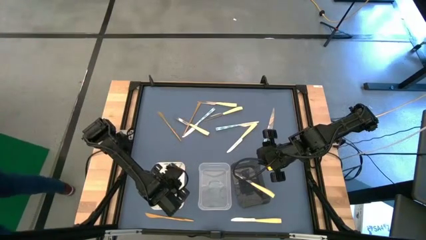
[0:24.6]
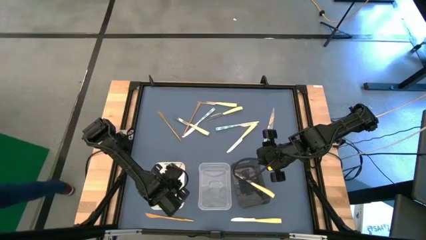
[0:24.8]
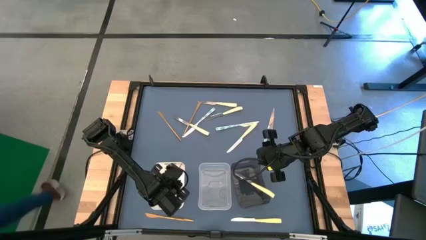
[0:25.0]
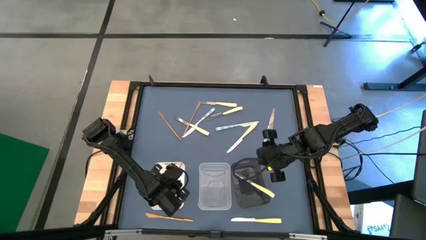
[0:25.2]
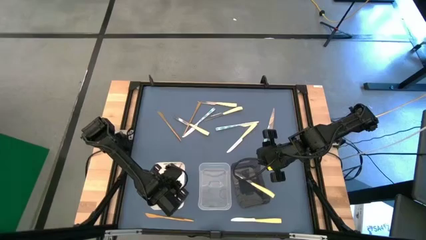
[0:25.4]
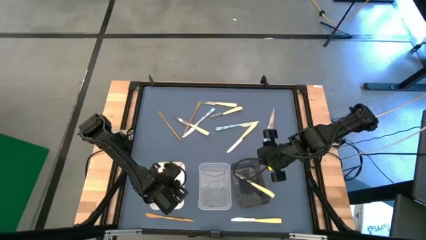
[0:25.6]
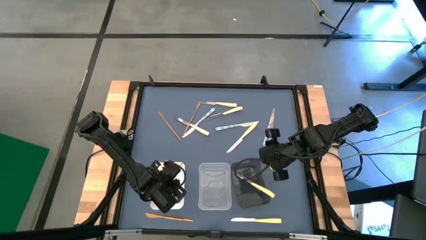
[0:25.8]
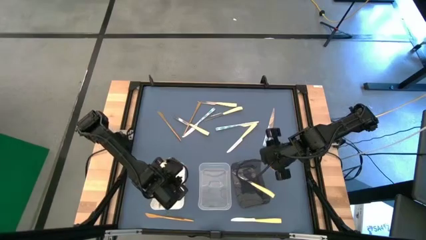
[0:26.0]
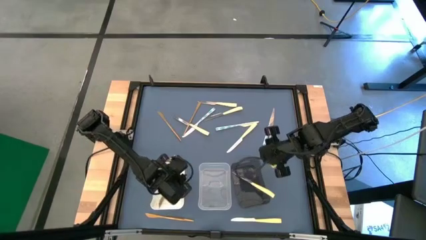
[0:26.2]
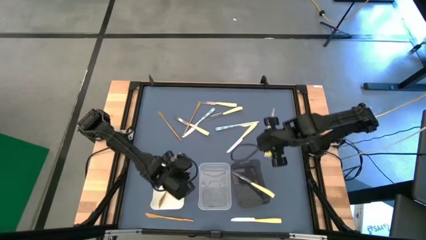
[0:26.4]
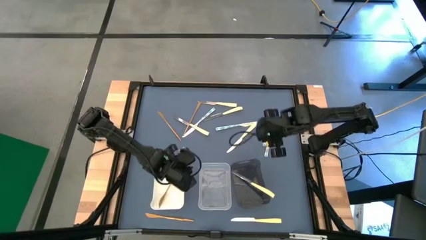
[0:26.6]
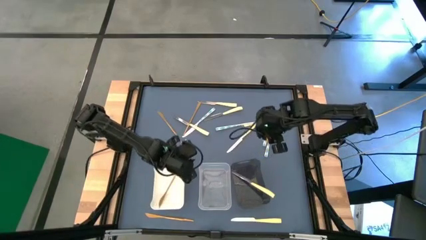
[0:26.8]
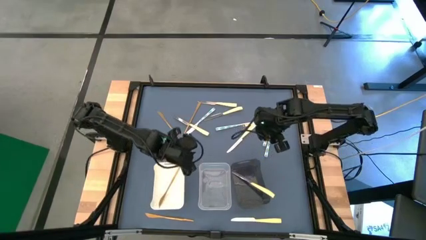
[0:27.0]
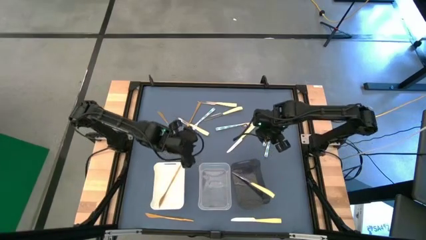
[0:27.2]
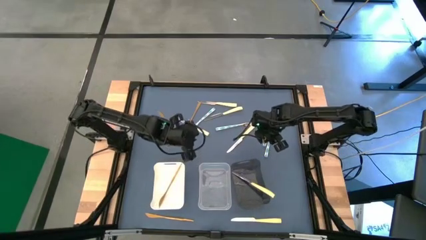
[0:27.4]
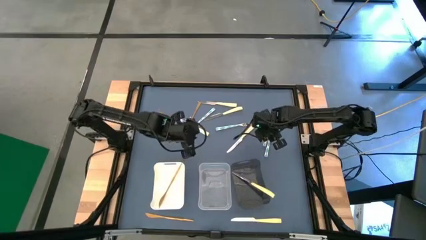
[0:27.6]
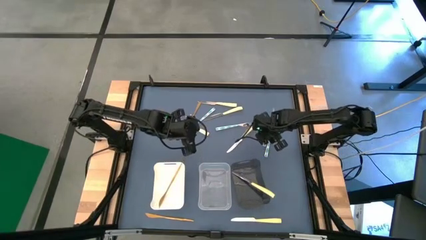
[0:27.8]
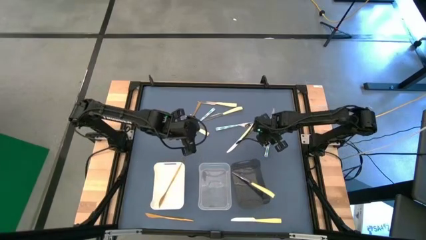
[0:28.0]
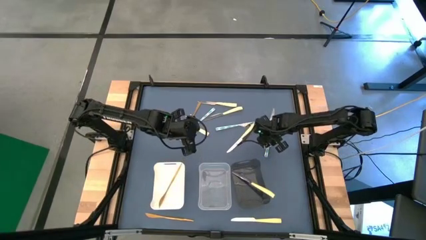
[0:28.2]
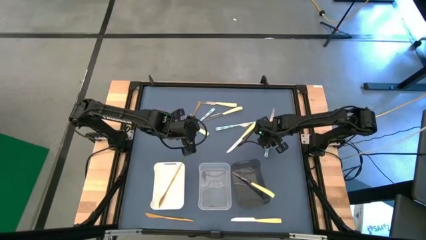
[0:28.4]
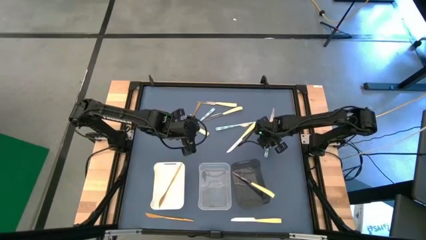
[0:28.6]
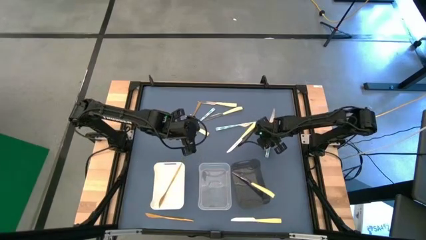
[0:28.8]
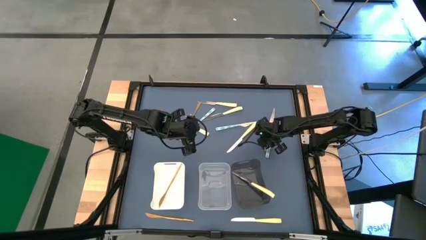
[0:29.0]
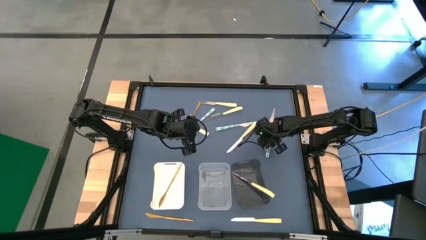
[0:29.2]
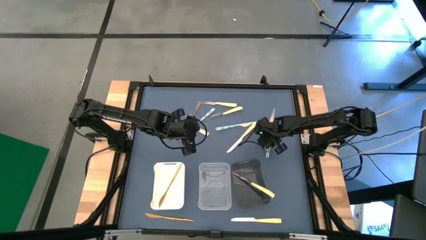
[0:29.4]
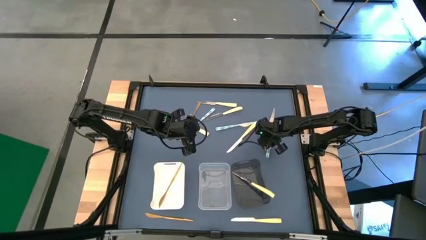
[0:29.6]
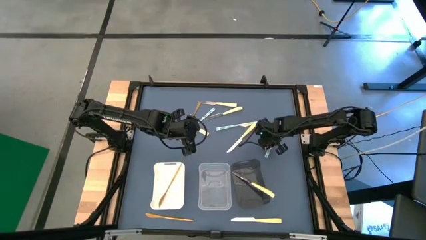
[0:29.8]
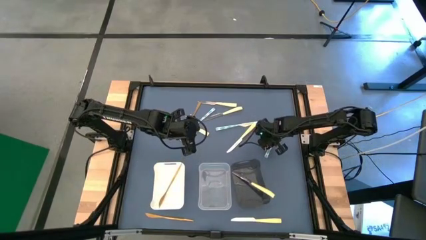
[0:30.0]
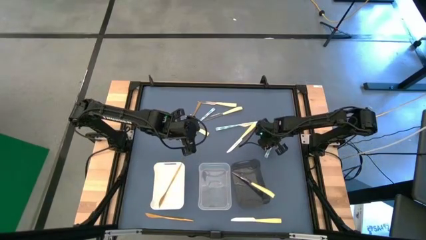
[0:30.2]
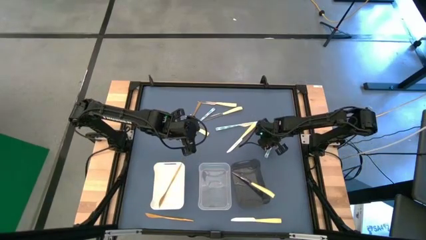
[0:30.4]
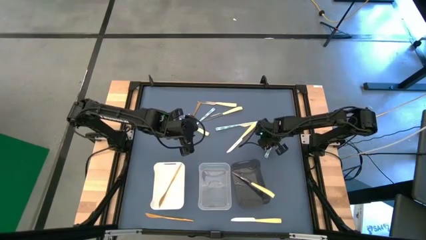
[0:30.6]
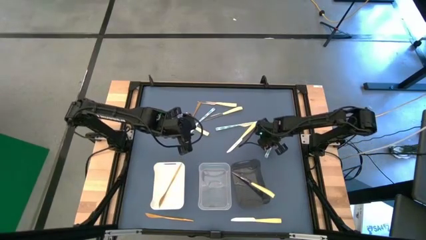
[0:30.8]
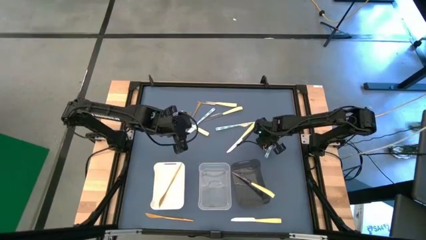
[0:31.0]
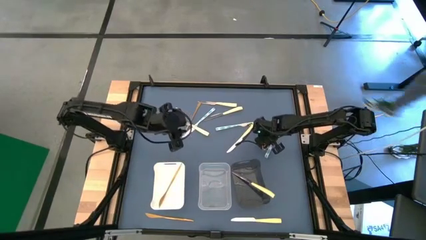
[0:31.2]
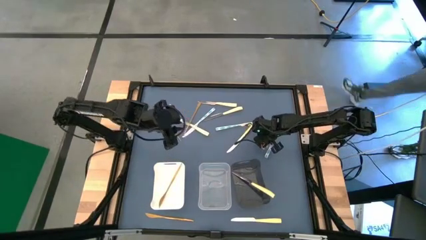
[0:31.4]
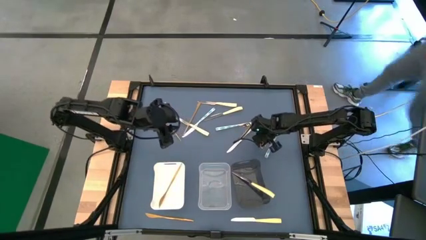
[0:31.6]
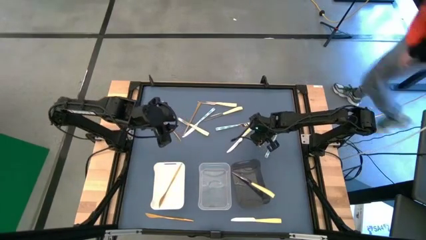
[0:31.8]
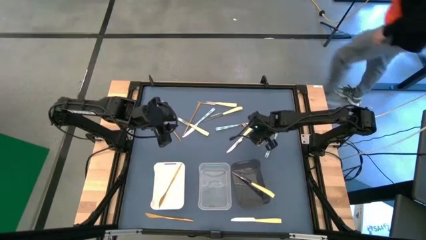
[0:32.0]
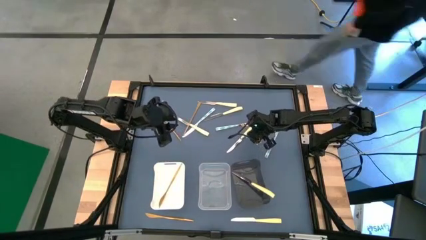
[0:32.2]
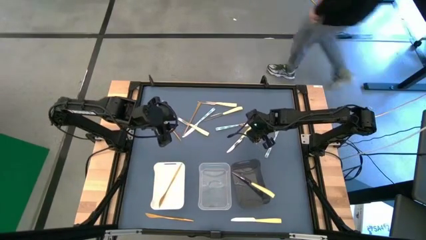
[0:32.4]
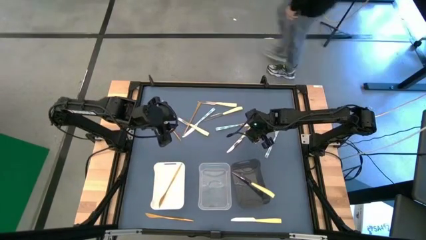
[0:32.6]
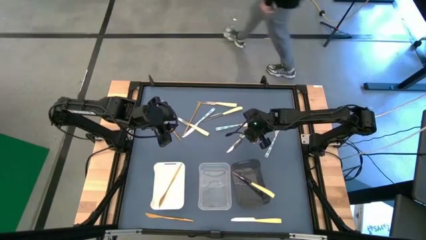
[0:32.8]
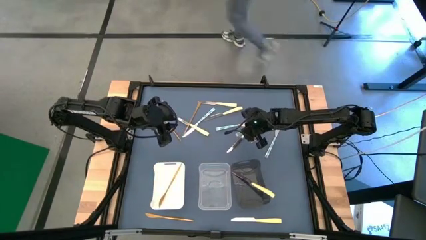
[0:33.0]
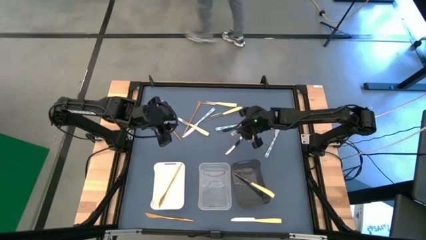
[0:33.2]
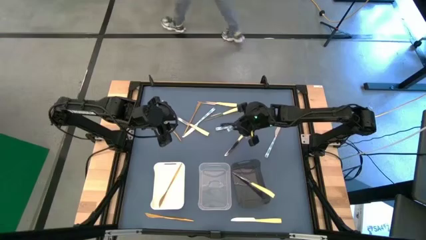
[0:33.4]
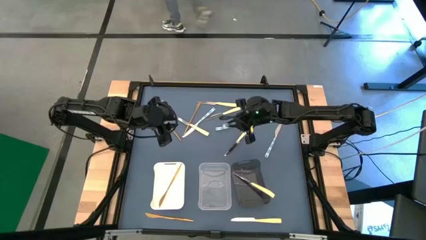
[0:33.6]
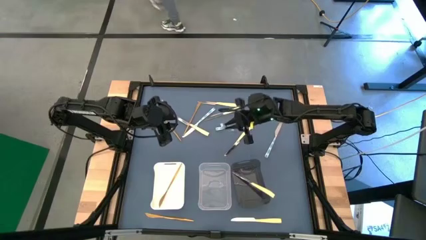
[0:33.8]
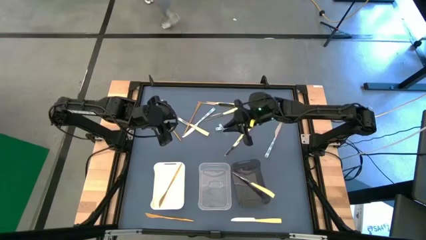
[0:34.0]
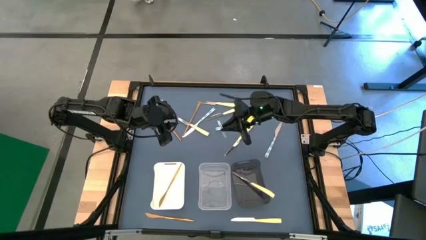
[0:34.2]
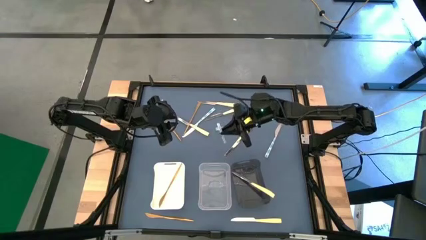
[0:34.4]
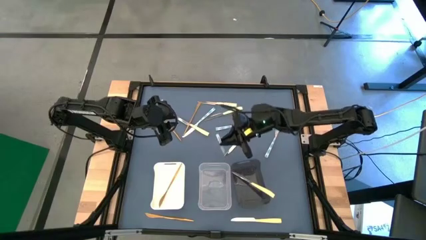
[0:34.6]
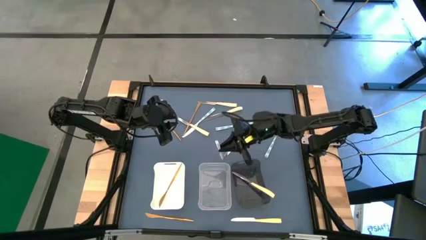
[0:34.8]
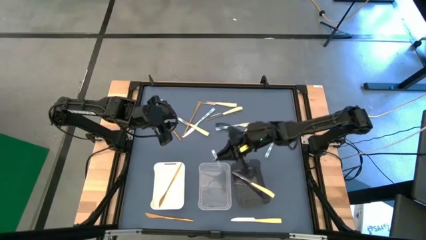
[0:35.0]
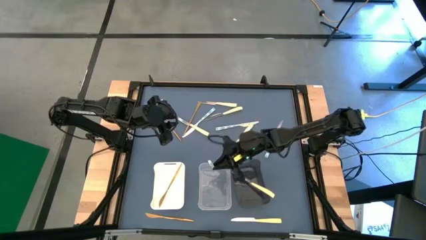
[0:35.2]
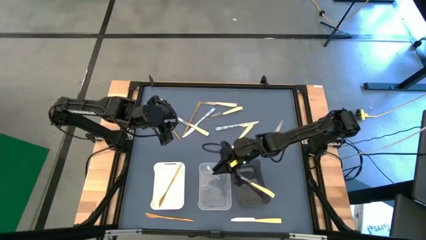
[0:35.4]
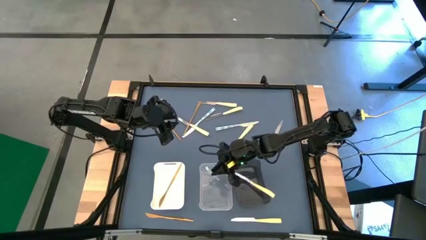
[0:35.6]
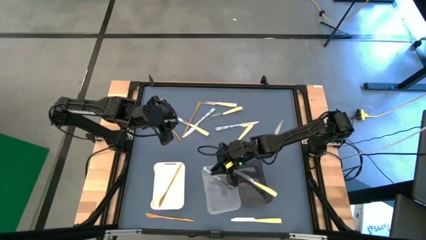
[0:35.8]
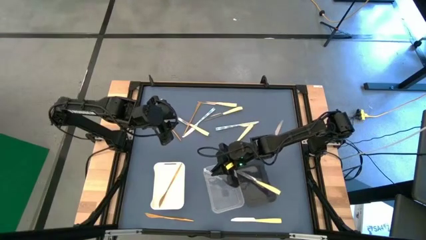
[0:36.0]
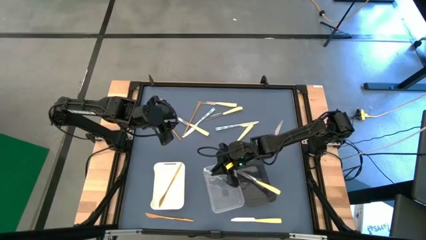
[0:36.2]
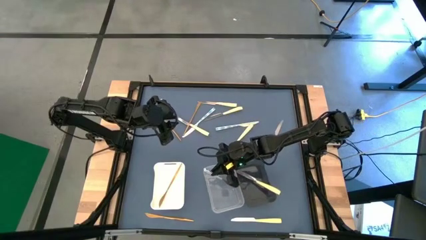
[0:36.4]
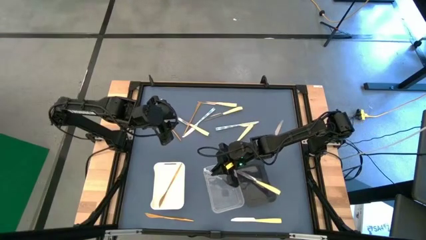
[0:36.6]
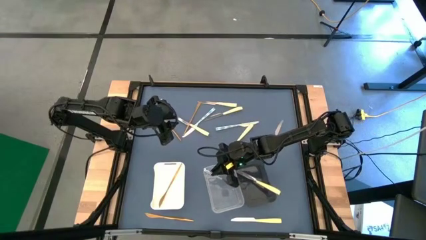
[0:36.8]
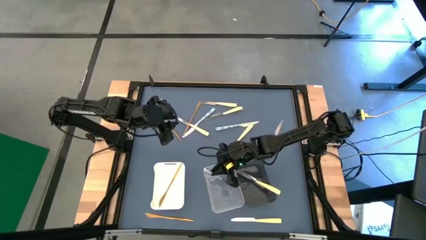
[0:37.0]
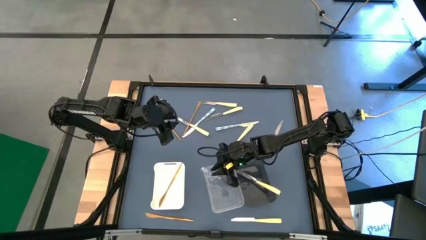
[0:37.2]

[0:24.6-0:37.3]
Task: Sort silverware by color (type)
Put the blue patterned table knife into the transparent bin

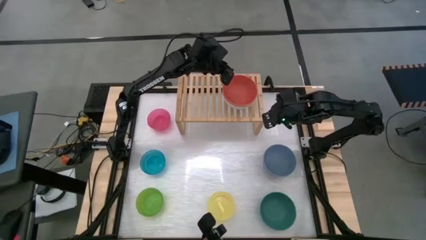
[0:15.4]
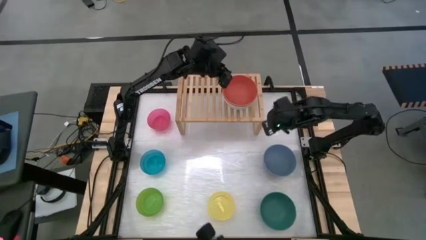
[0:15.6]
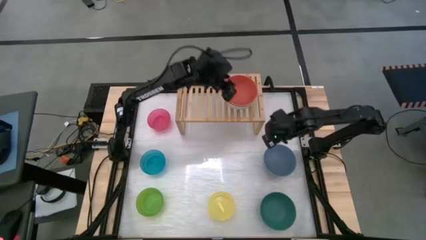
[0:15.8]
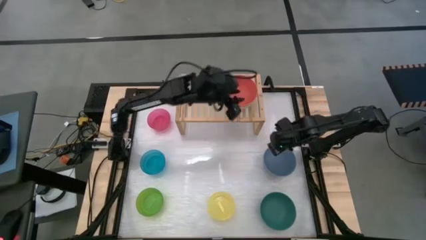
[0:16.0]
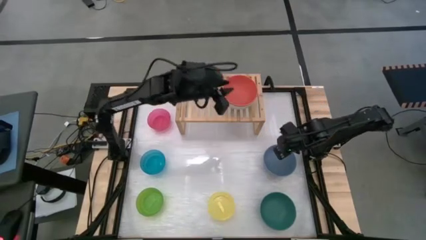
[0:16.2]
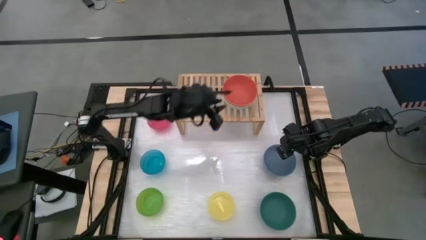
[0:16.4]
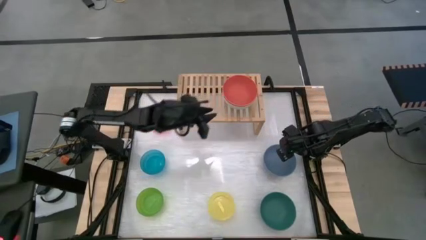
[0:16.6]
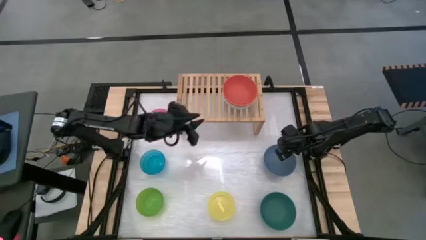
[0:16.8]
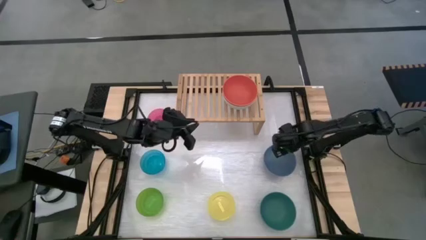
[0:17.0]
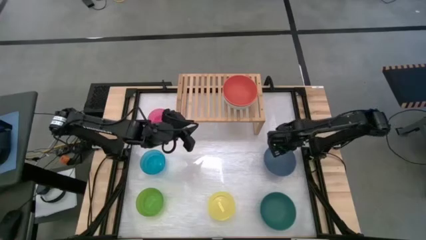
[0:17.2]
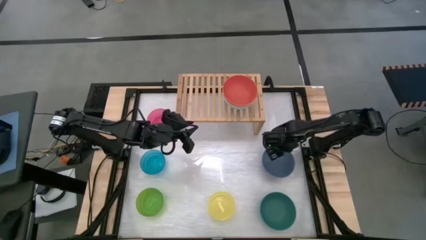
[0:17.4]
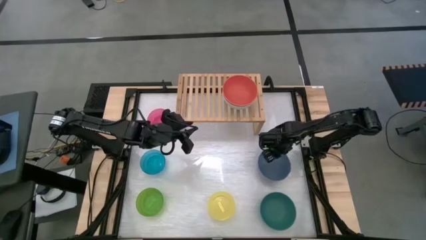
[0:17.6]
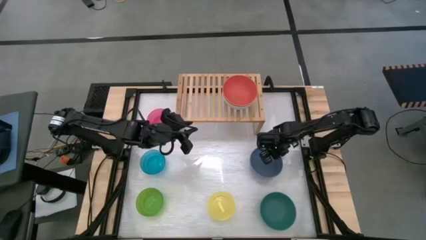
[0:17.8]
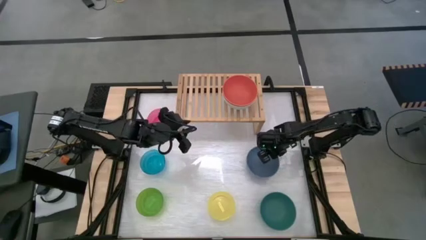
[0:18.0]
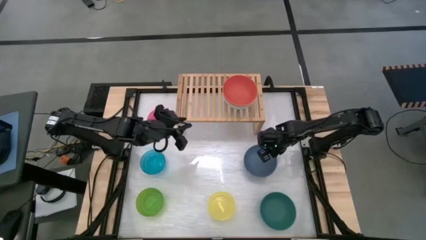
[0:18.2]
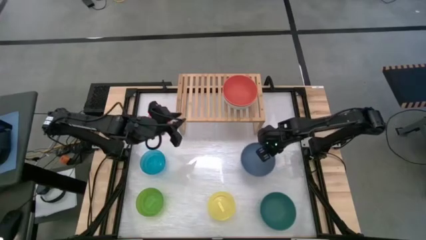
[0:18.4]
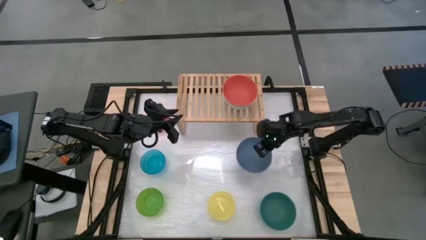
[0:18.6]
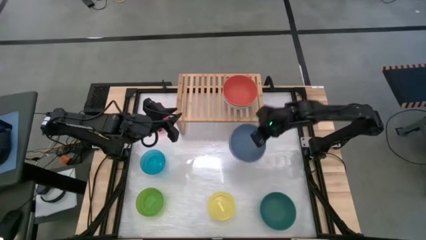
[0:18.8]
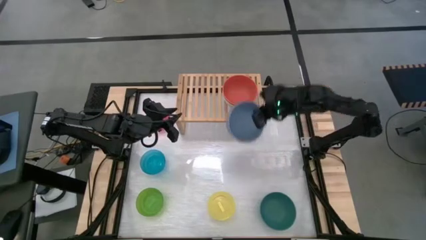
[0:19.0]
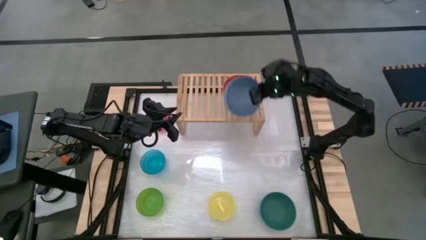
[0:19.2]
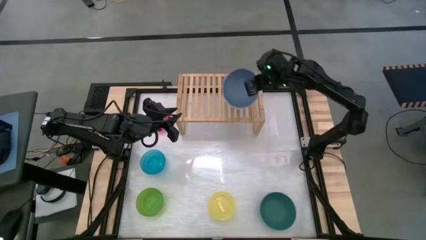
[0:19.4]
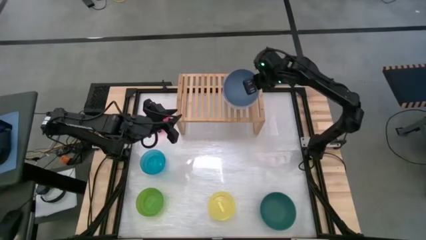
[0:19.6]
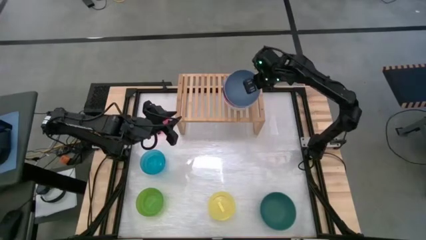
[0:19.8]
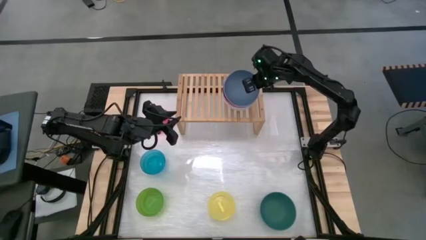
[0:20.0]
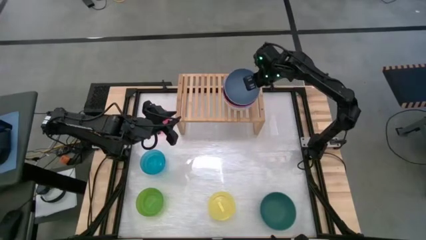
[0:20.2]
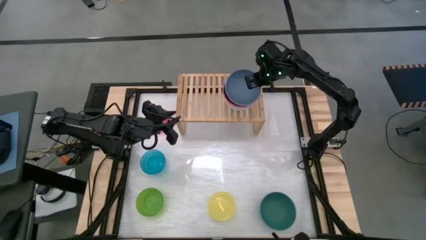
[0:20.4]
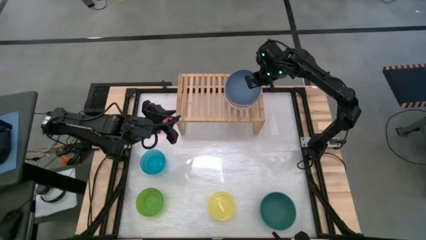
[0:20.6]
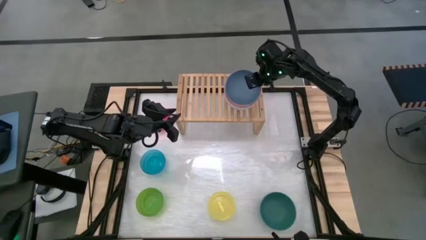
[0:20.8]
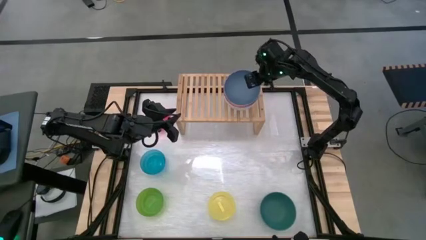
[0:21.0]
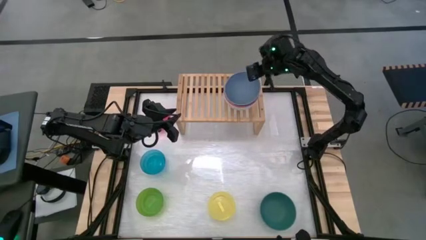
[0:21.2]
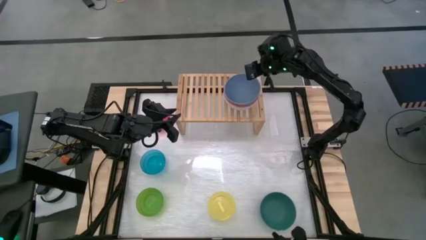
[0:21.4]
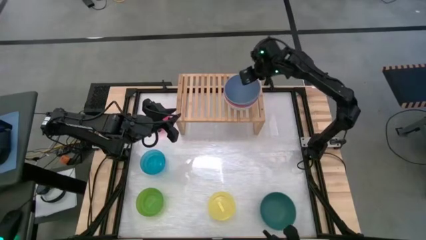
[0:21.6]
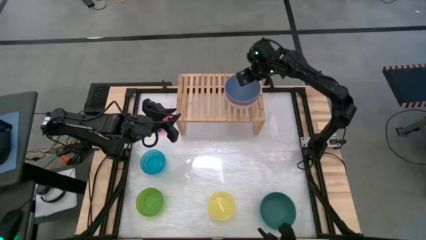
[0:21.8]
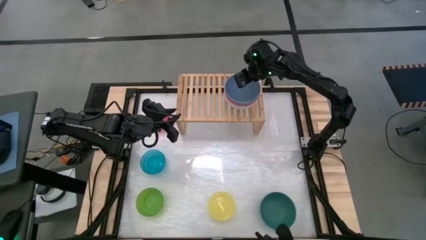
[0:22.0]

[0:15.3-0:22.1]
Task: Place and stack bowls onto a shelf
Stack the large blue bowl on the stack bowls on the shelf
